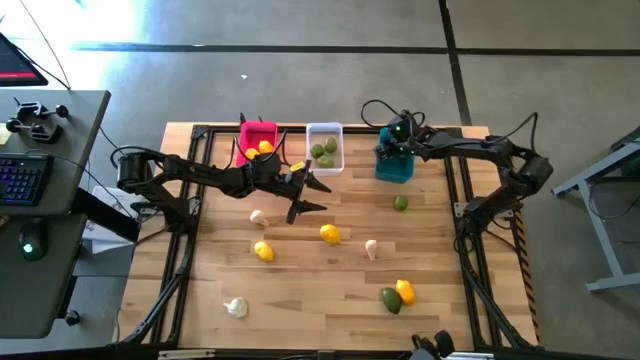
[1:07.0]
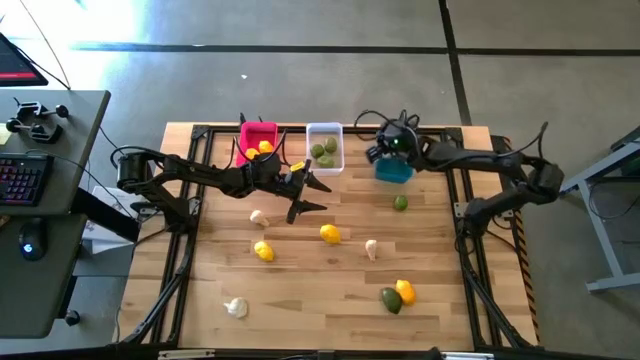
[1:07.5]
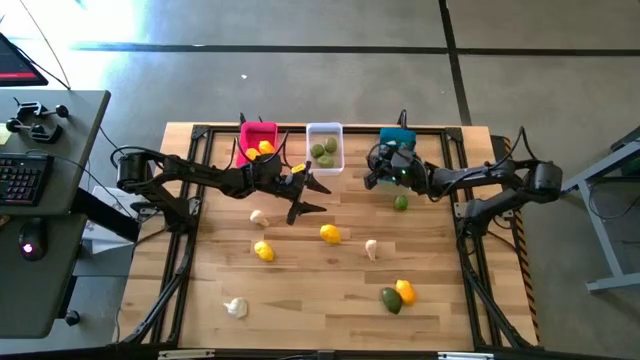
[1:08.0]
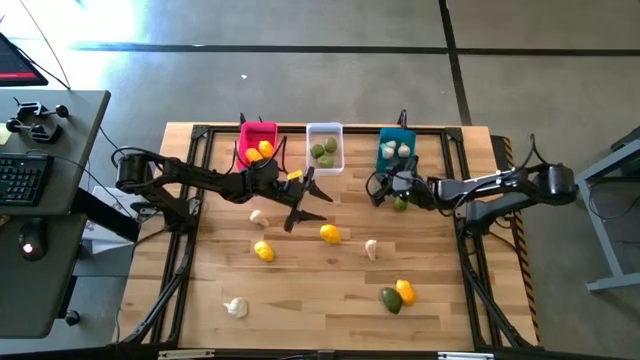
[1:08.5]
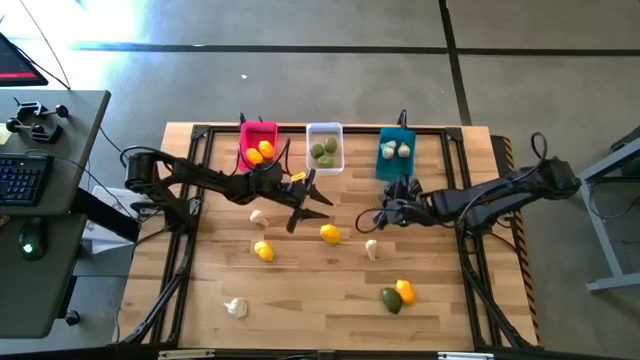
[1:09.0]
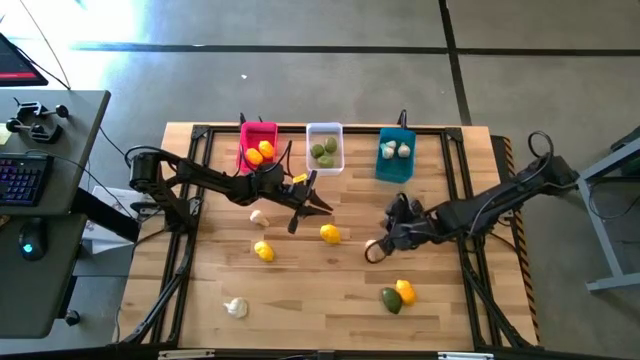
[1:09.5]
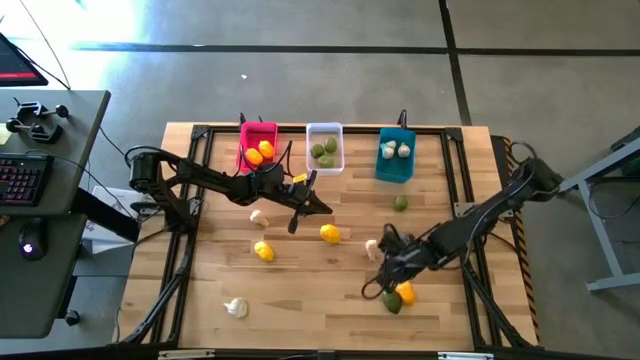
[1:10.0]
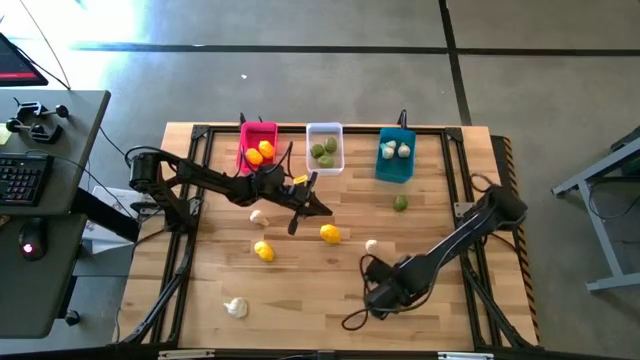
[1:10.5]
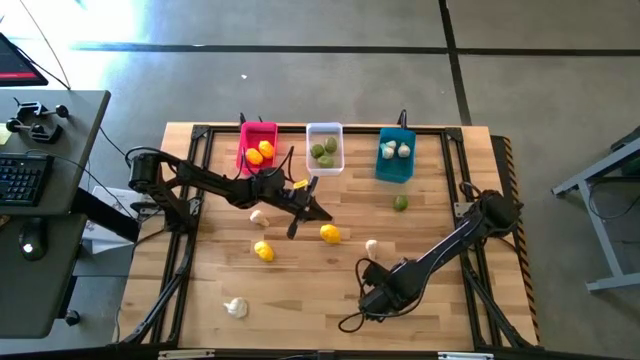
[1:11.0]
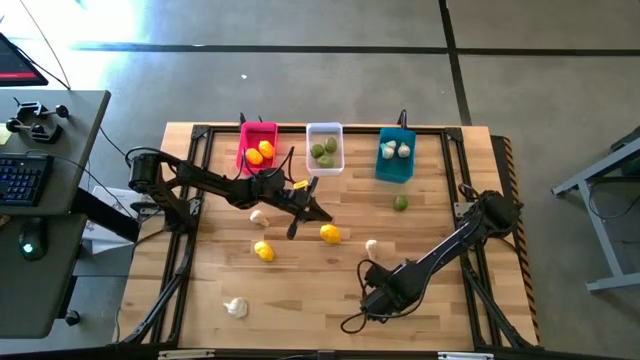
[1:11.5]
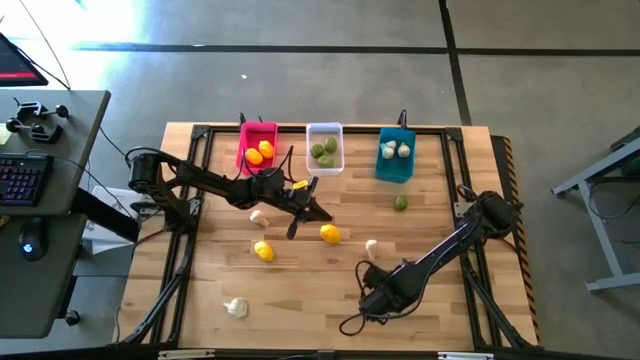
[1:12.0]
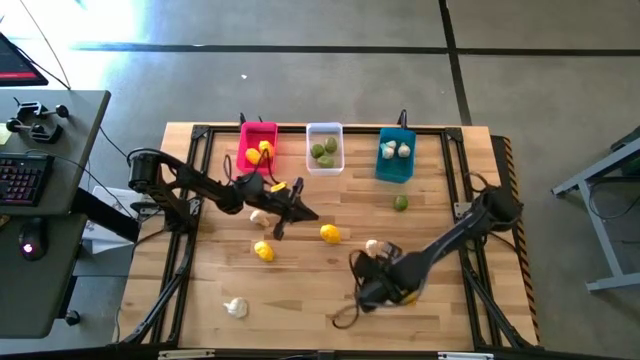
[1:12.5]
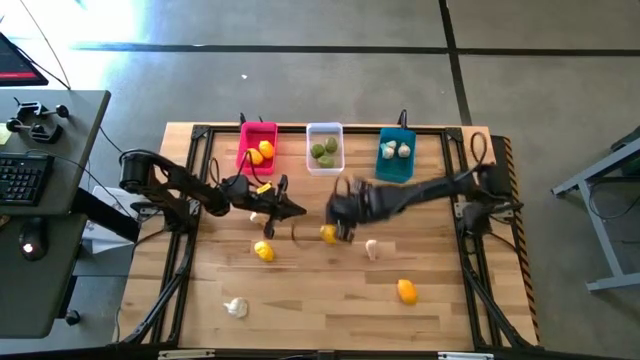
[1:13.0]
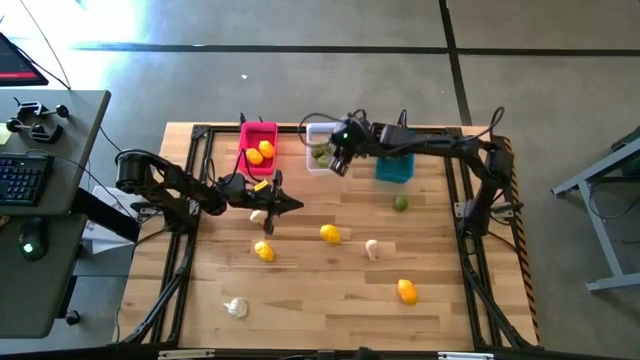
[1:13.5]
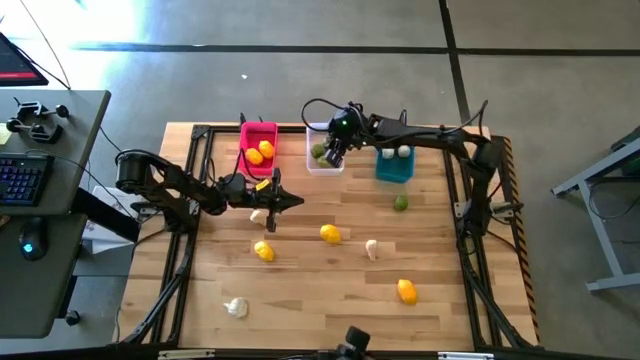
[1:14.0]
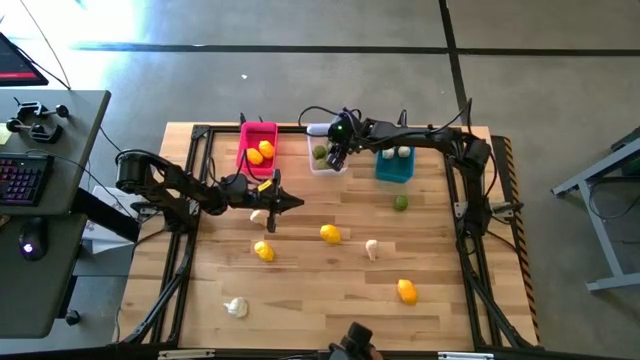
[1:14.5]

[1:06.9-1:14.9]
Task: Sort produce into baskets
Put the lime into the transparent bin

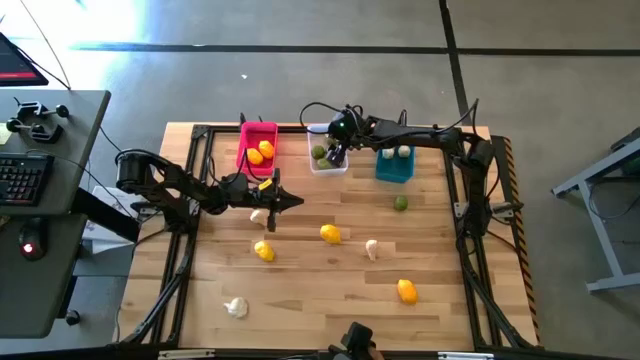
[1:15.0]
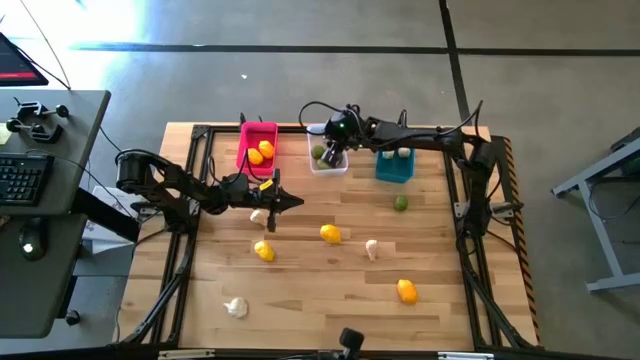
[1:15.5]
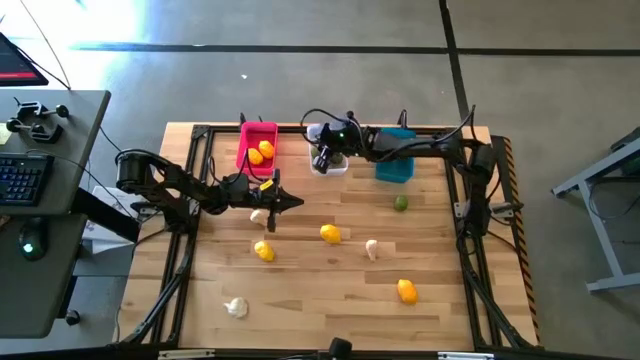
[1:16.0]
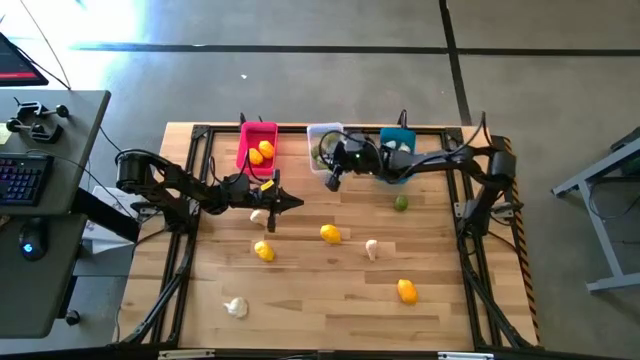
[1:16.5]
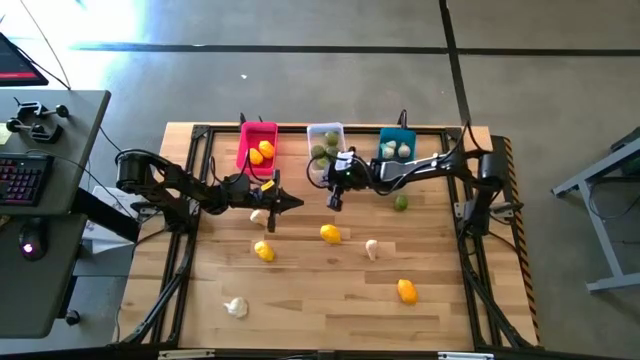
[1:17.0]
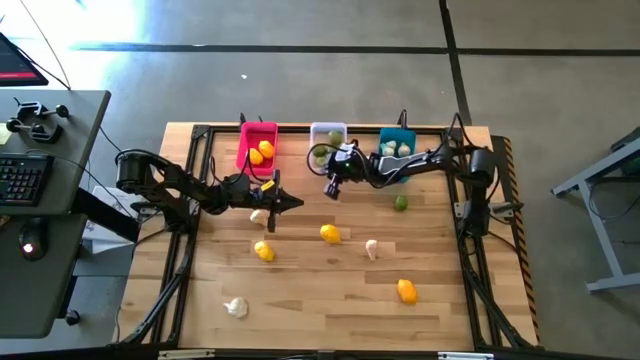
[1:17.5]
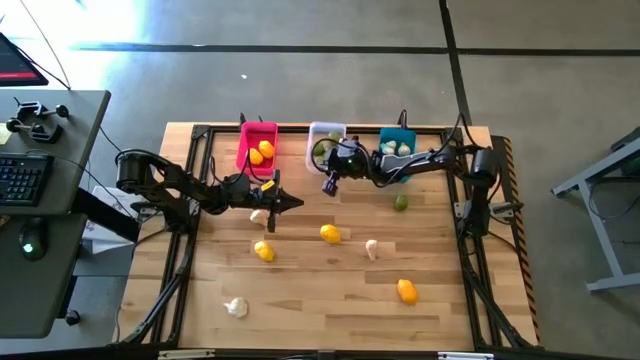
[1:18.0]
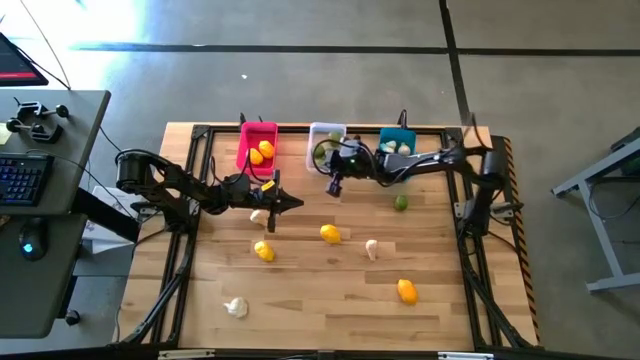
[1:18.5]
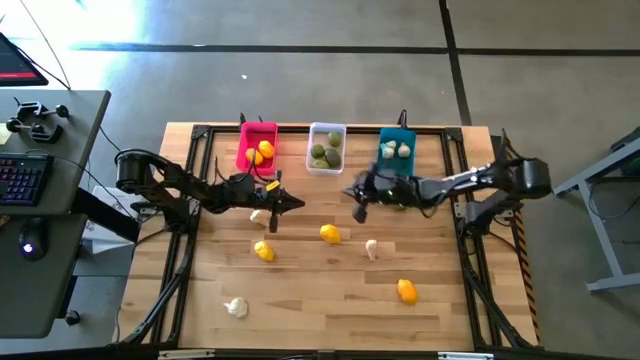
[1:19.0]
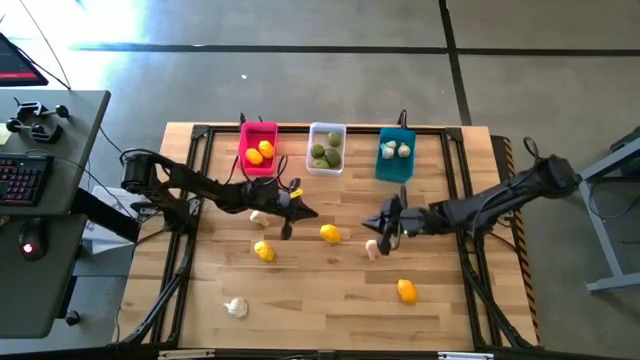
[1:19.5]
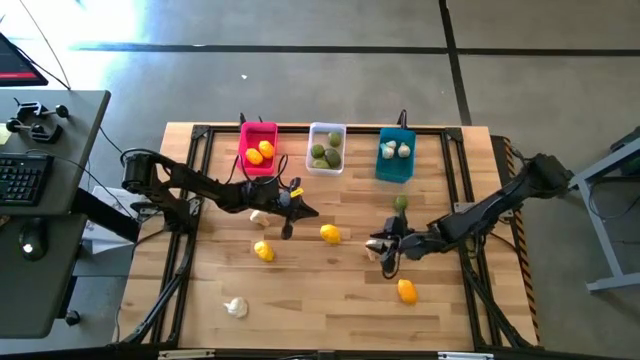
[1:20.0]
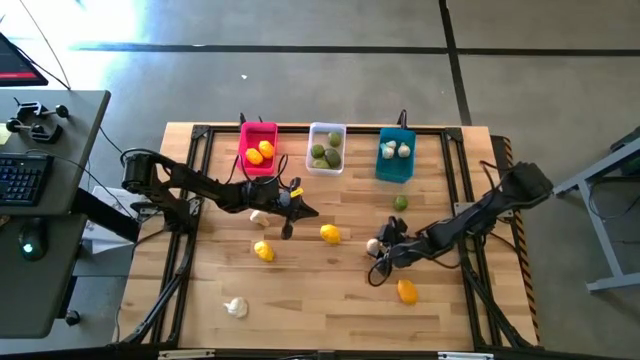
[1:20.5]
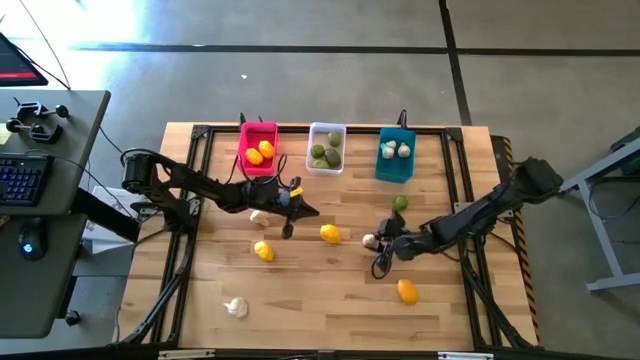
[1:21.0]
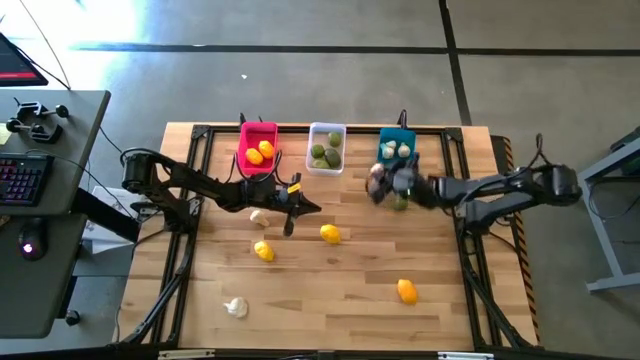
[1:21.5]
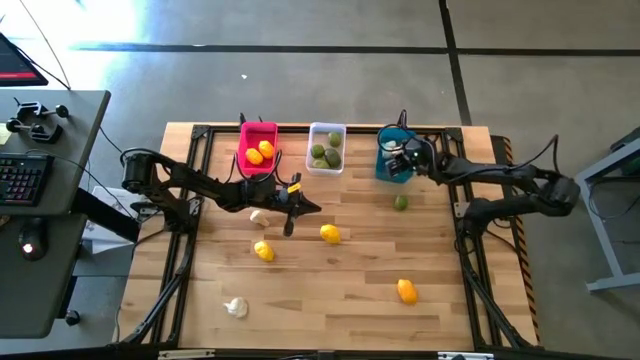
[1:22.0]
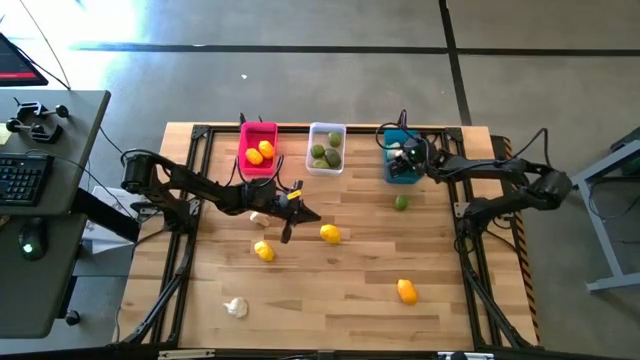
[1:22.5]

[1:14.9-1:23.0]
Put the white garlic into the blue bin

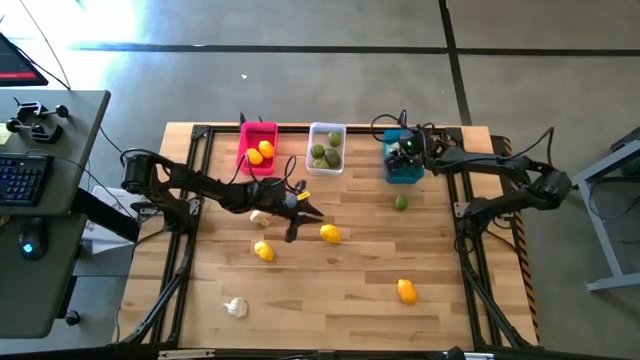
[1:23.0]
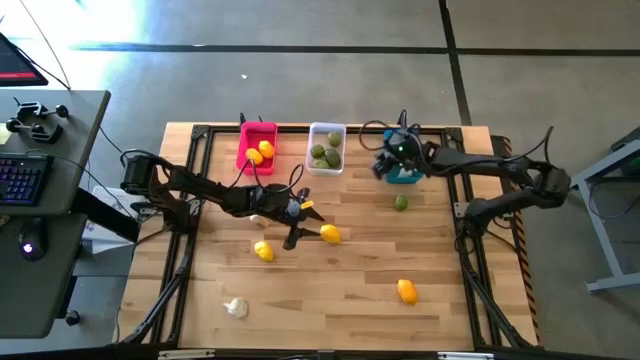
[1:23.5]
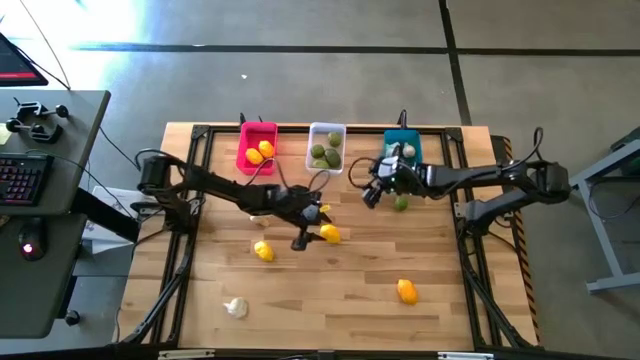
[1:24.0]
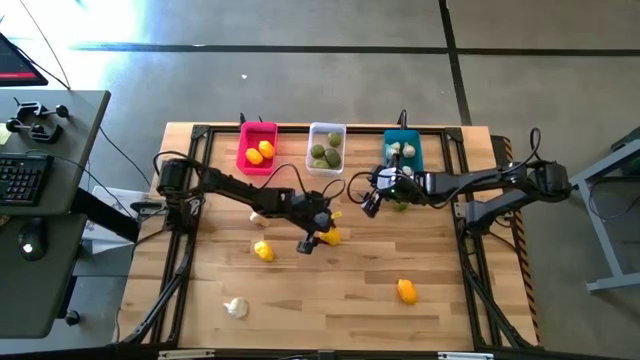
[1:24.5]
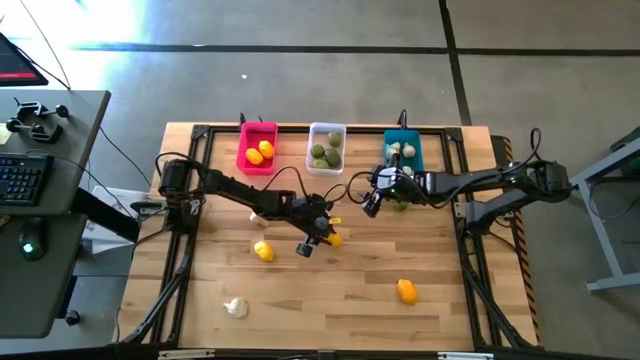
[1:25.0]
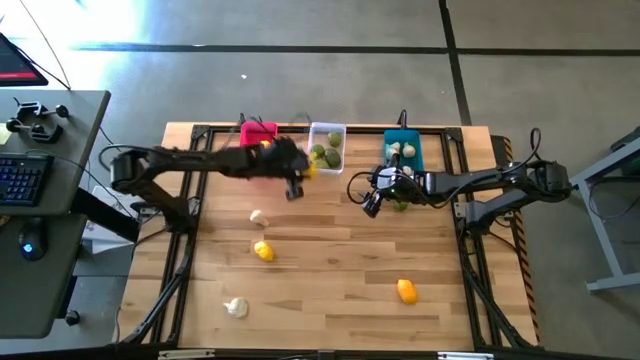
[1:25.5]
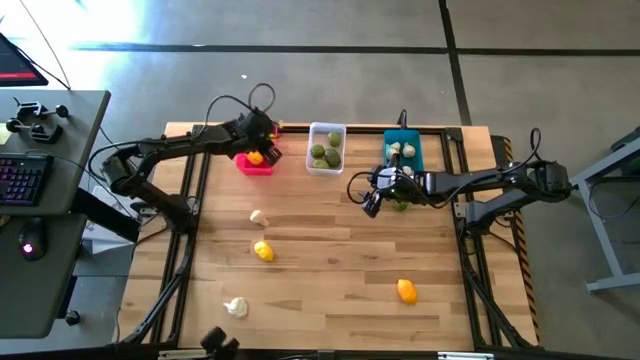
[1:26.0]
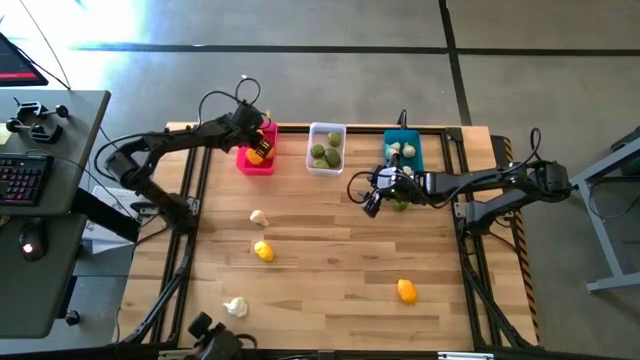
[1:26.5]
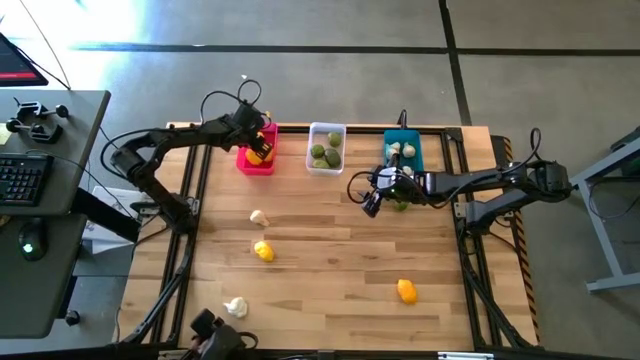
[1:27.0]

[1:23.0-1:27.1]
Put the lemon into the pink bin

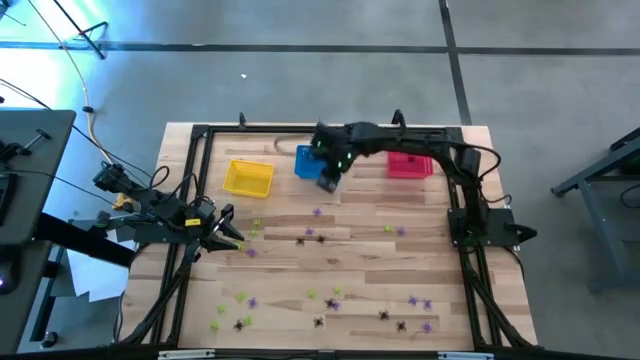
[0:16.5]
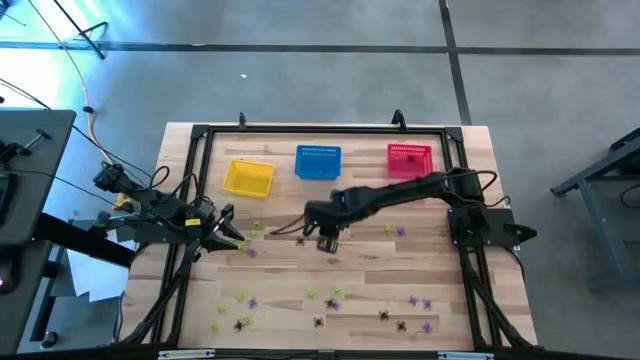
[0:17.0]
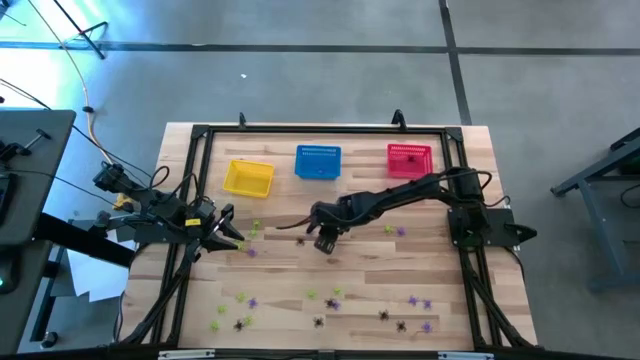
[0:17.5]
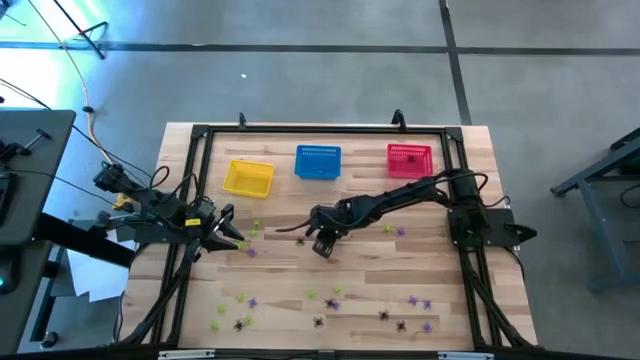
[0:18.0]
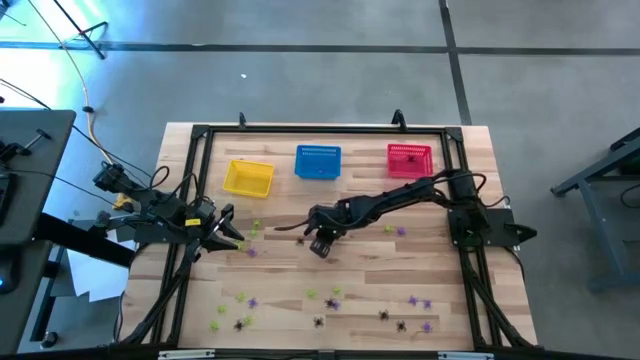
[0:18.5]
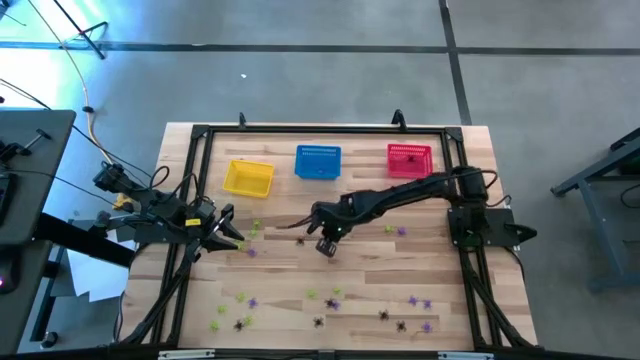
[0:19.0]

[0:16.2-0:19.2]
Task: Sort Halloween decoration
Put the black spider toy into the red bin
